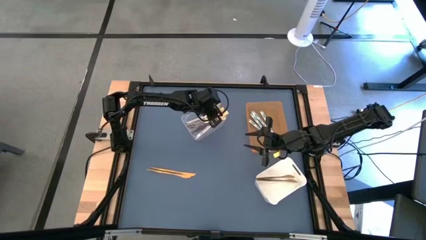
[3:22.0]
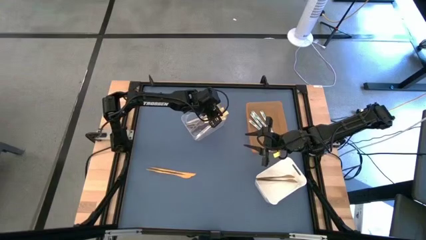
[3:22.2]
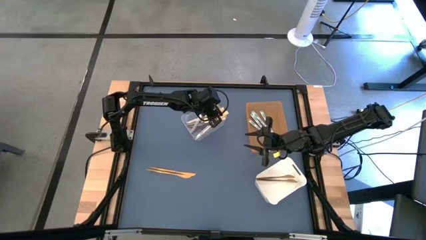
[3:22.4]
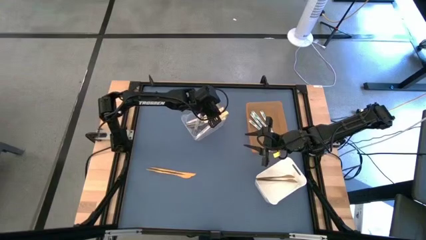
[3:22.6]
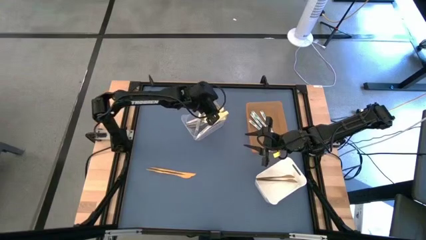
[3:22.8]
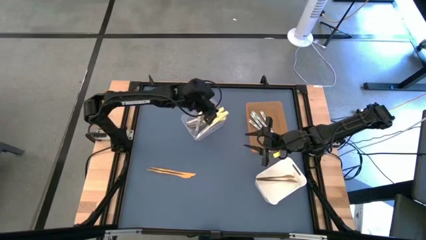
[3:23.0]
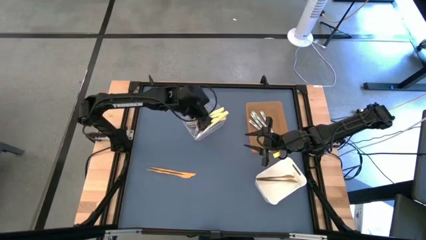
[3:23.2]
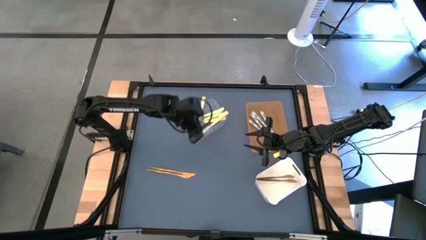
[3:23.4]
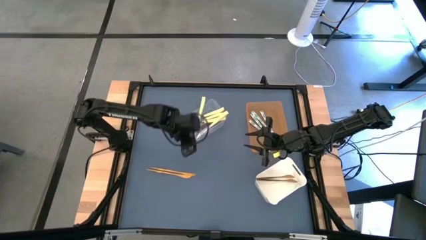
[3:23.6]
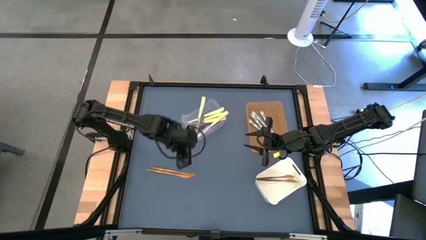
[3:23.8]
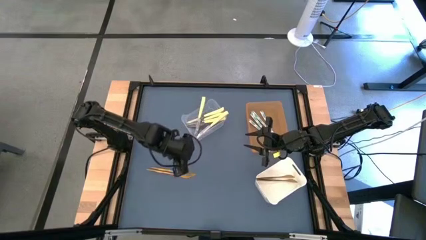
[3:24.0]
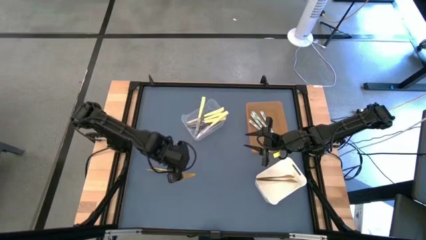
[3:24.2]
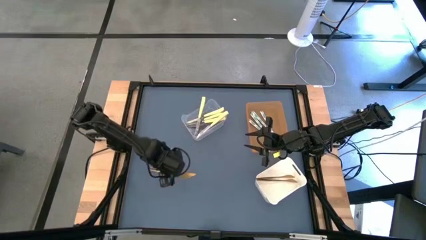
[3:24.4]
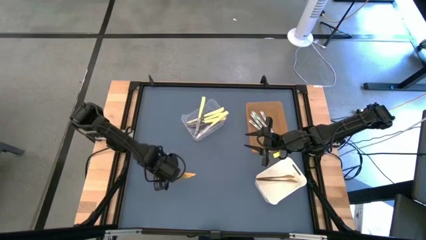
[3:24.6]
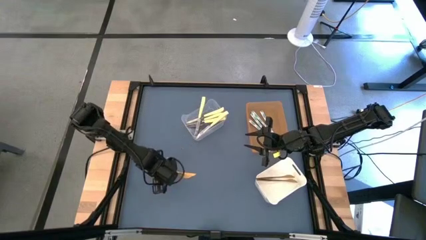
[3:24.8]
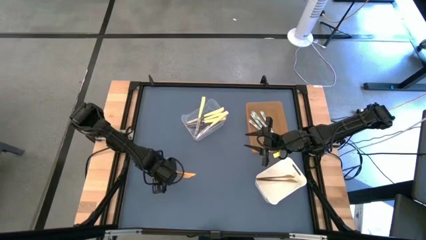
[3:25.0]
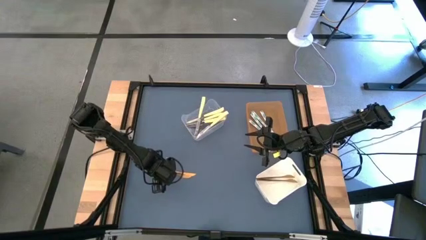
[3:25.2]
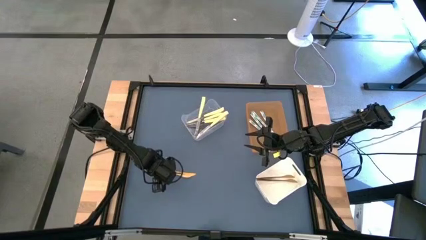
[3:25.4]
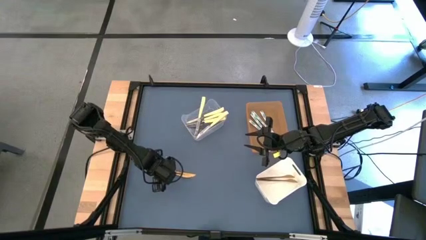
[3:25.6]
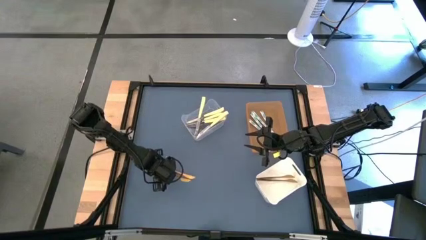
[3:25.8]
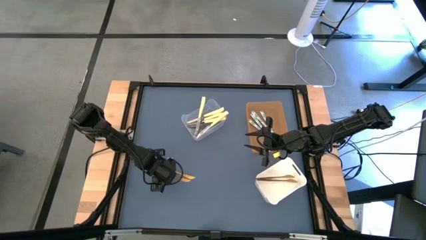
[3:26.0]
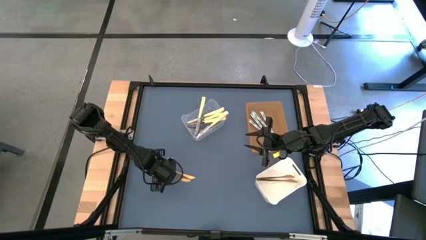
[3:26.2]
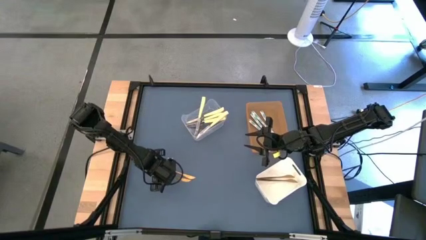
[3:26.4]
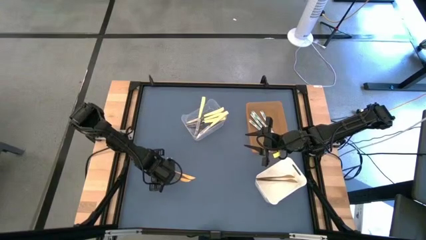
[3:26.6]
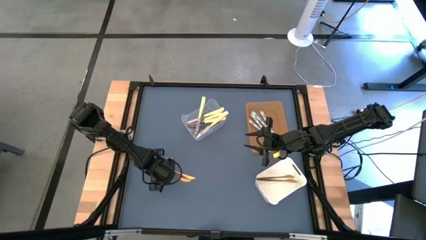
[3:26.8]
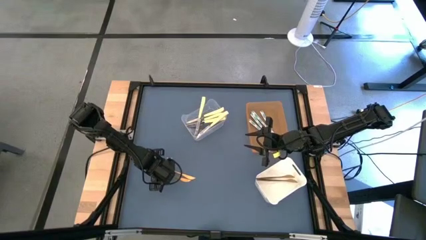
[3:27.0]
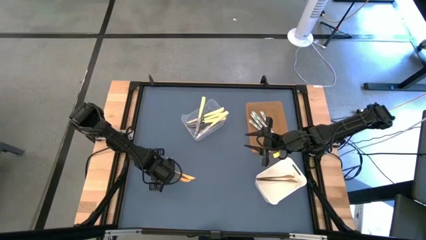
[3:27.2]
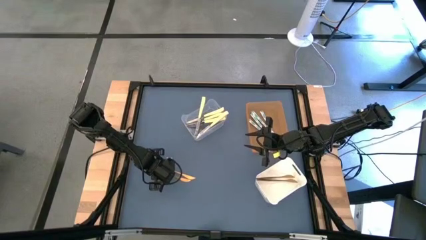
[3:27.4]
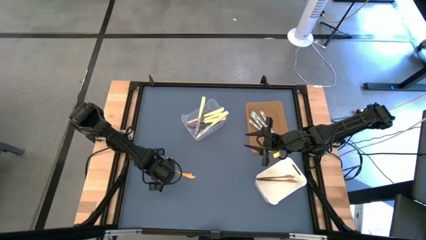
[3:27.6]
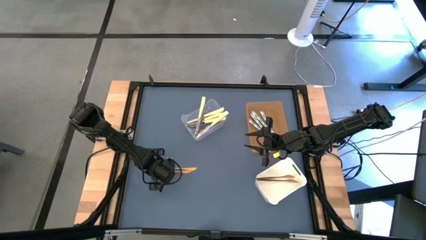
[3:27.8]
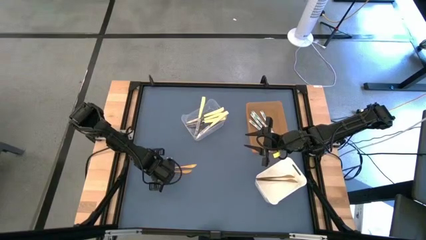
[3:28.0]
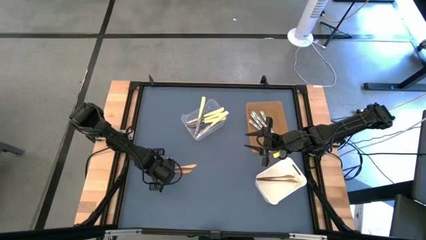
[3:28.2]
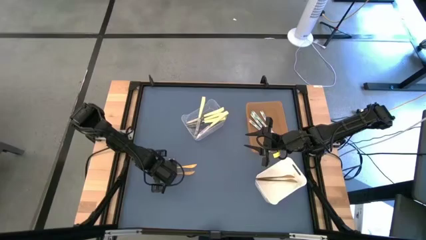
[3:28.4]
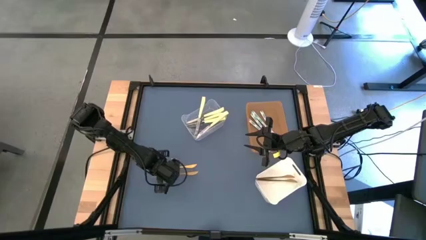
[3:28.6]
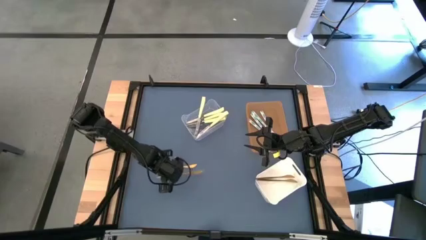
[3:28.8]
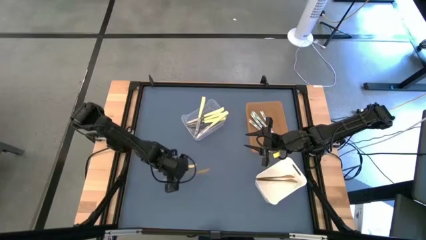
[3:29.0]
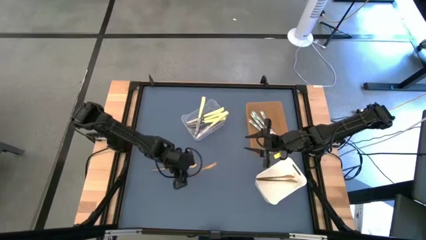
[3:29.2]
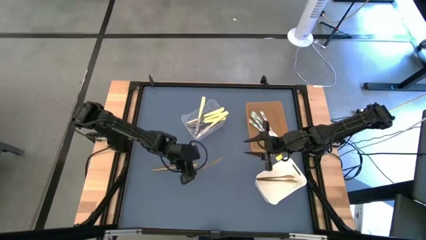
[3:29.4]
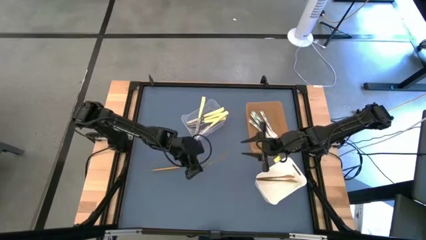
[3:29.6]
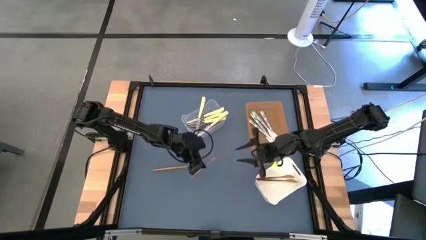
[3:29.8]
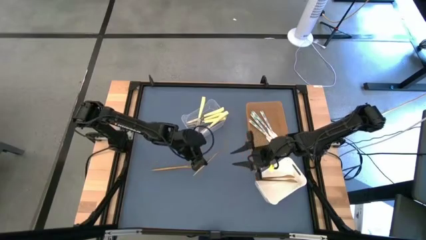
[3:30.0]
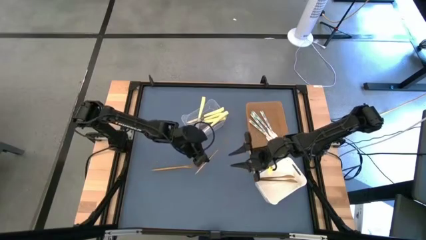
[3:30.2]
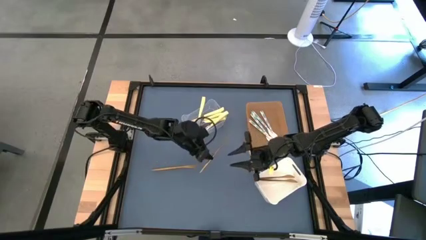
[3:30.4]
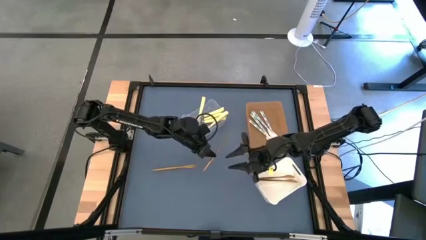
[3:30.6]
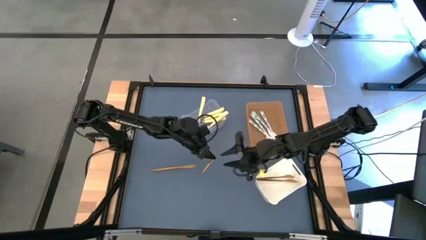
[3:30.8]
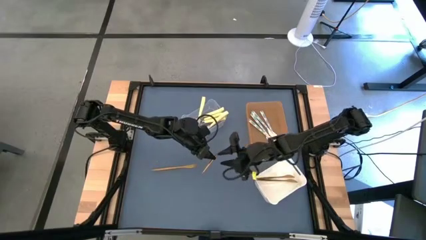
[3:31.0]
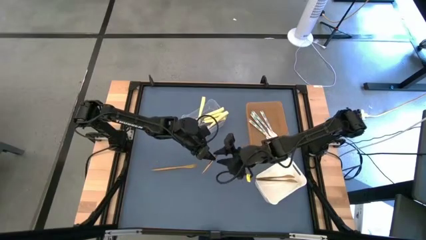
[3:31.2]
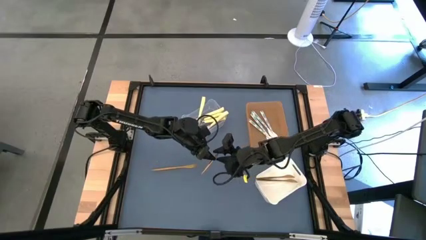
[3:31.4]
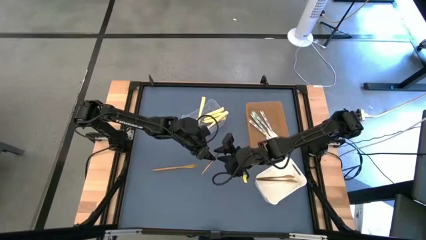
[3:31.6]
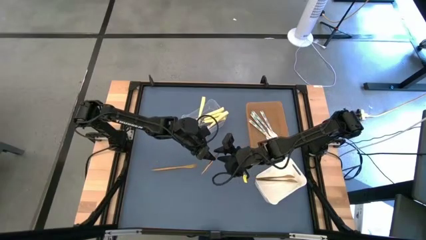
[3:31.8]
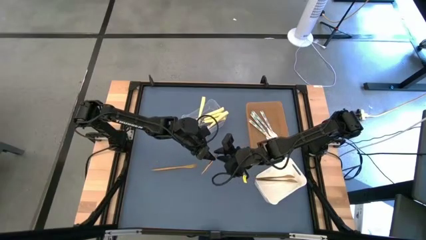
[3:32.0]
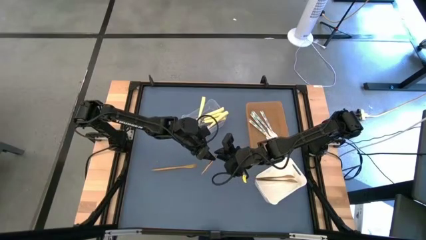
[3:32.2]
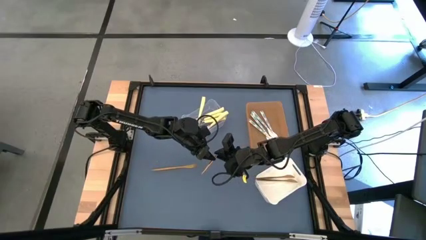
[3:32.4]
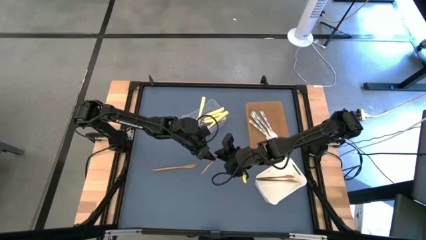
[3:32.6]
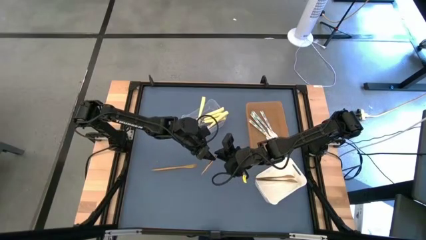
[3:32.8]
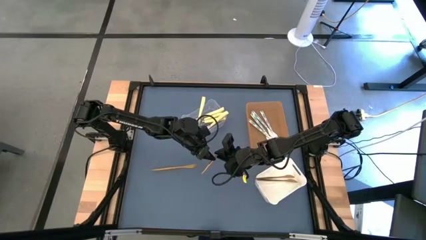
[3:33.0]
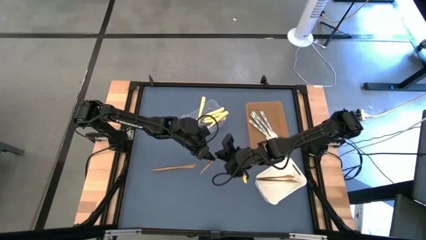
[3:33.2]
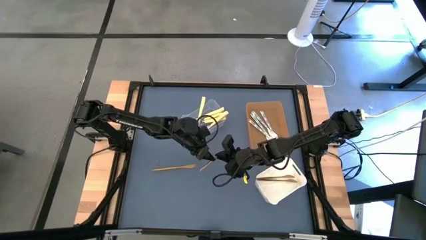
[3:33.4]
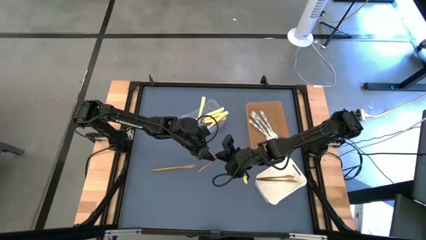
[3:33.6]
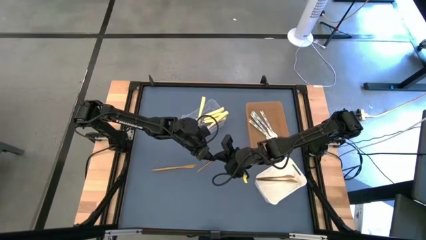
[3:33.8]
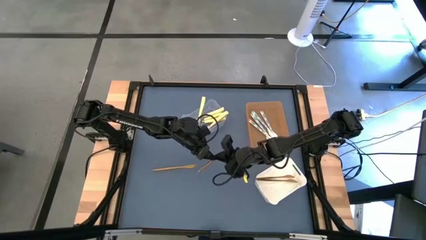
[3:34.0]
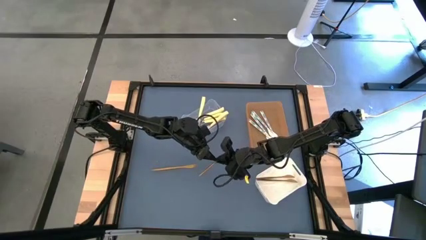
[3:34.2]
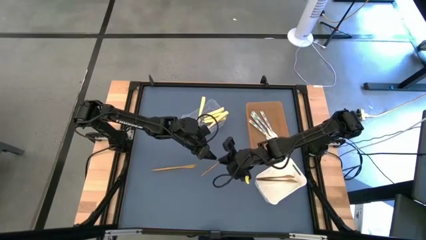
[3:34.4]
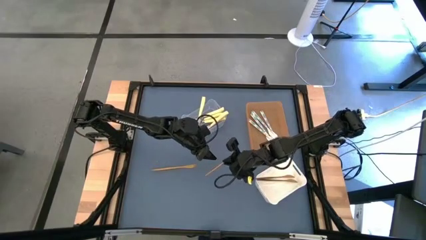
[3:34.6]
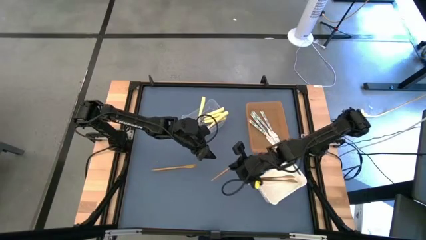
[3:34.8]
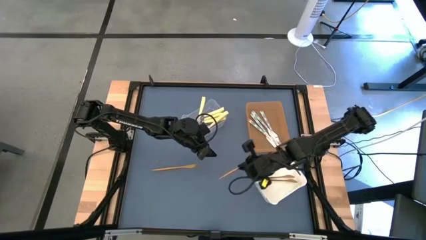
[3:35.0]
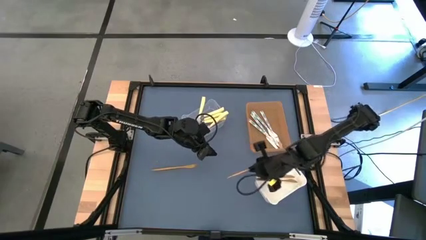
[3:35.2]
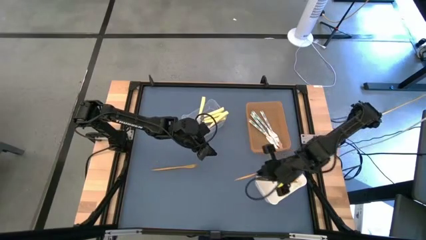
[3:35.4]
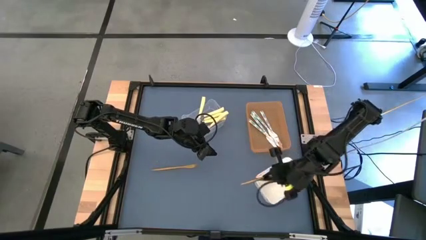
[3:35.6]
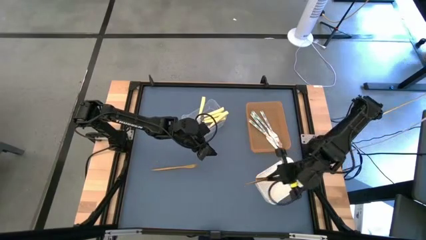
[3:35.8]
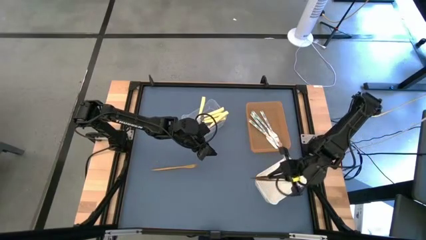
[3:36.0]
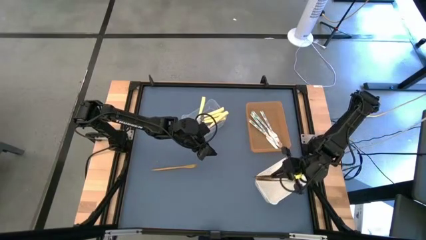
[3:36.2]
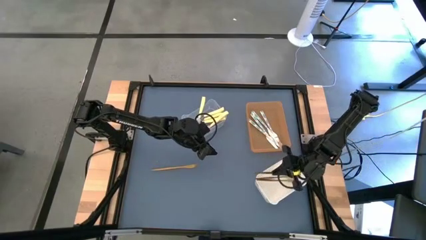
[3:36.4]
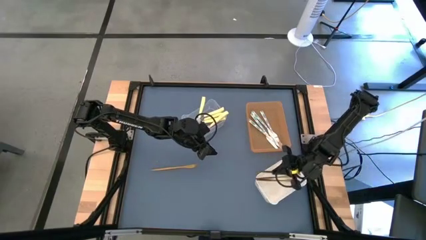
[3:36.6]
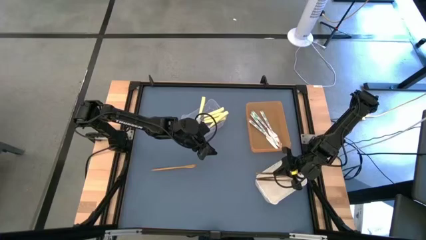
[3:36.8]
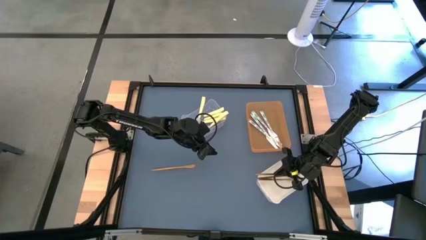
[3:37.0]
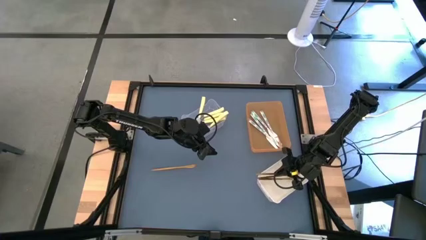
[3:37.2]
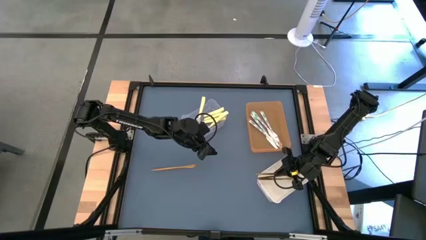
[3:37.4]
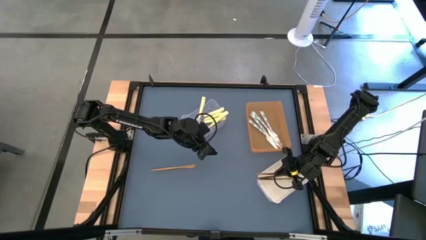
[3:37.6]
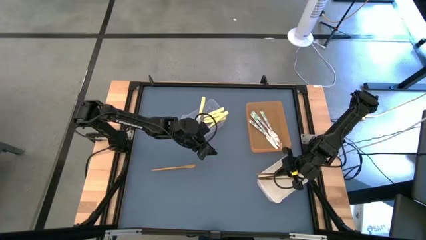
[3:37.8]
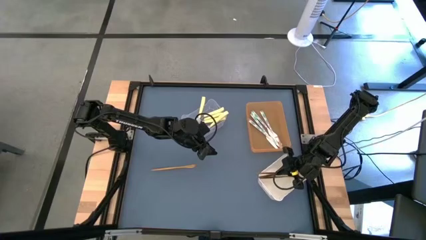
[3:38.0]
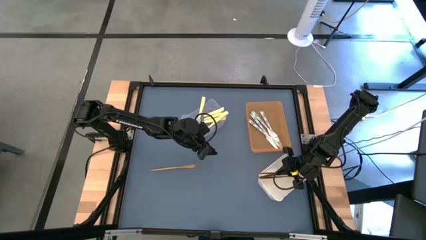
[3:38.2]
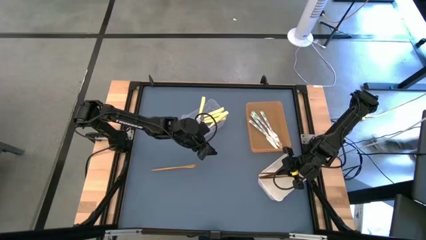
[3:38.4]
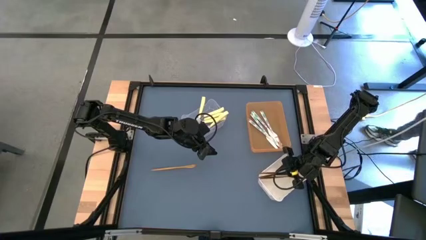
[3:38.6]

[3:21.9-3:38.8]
Task: Sort silverware by color (type)
Put the gold knife into the white bin
